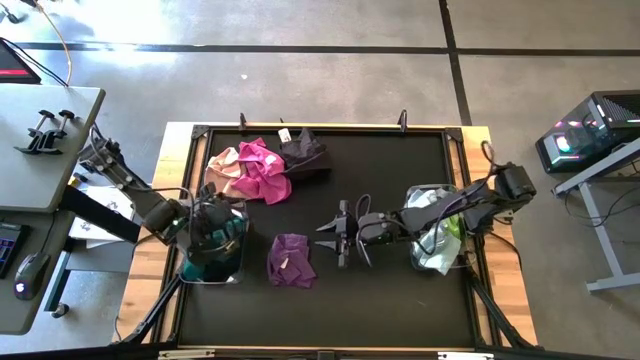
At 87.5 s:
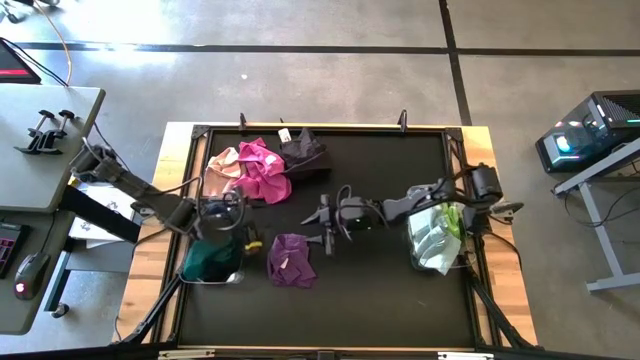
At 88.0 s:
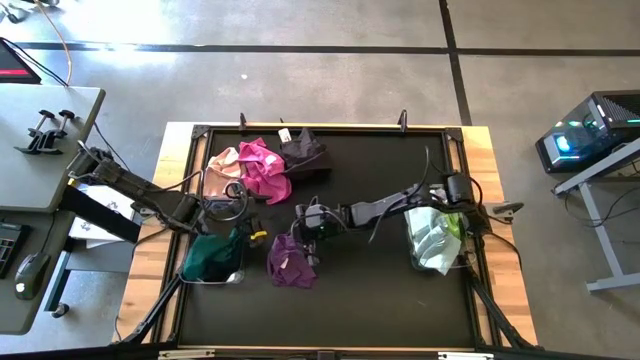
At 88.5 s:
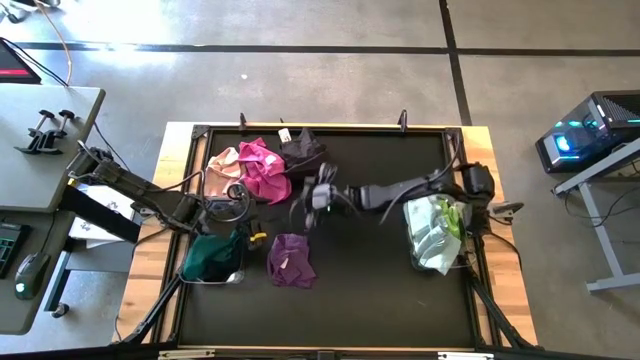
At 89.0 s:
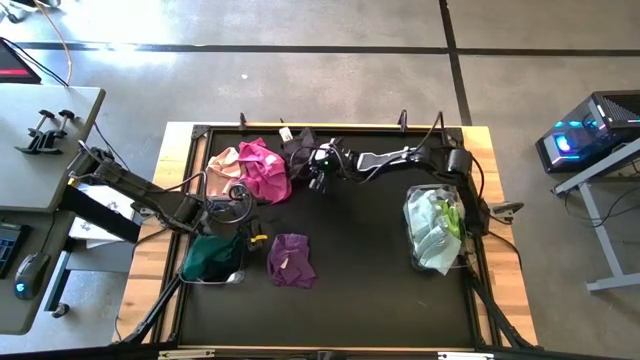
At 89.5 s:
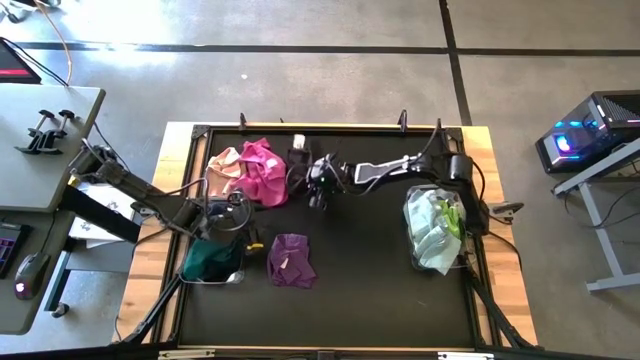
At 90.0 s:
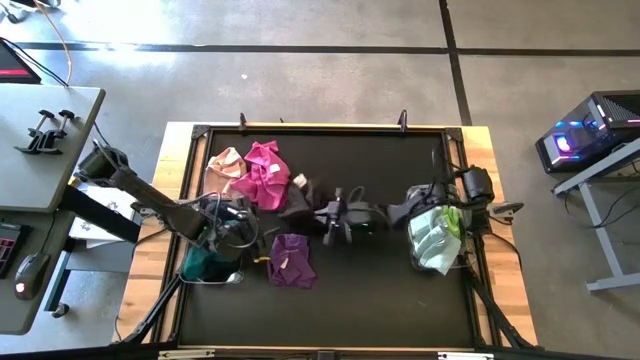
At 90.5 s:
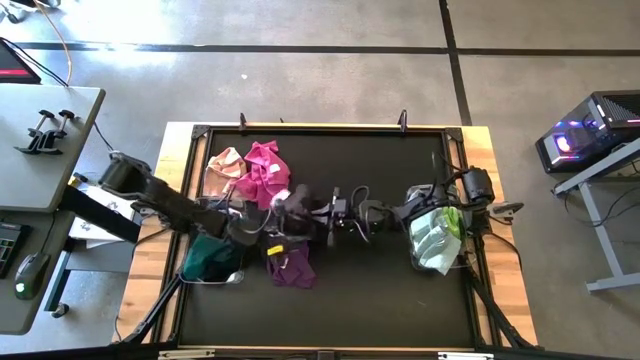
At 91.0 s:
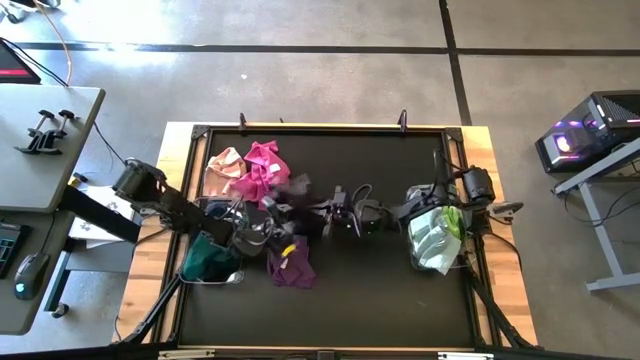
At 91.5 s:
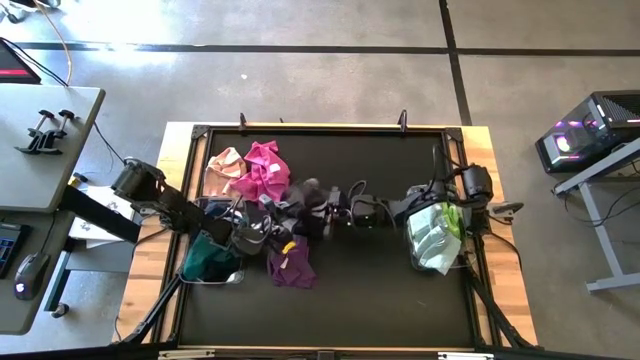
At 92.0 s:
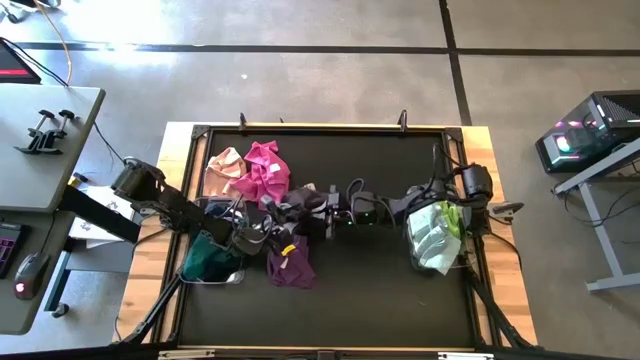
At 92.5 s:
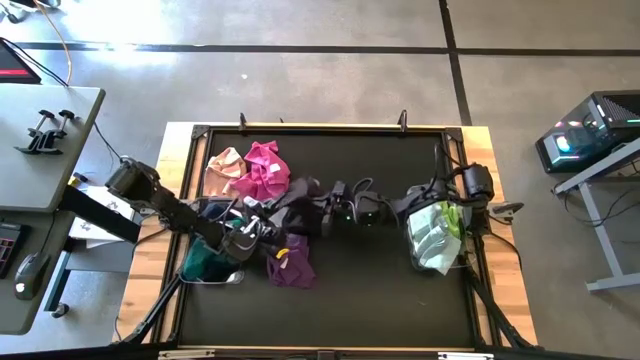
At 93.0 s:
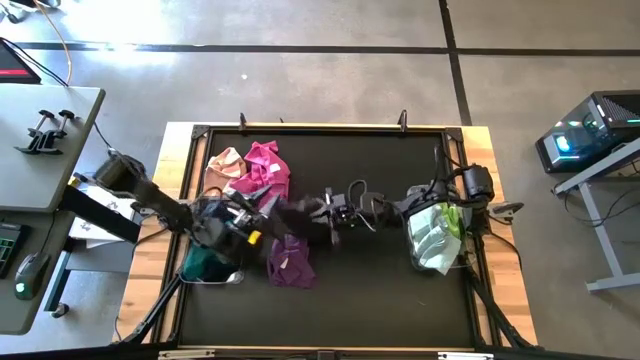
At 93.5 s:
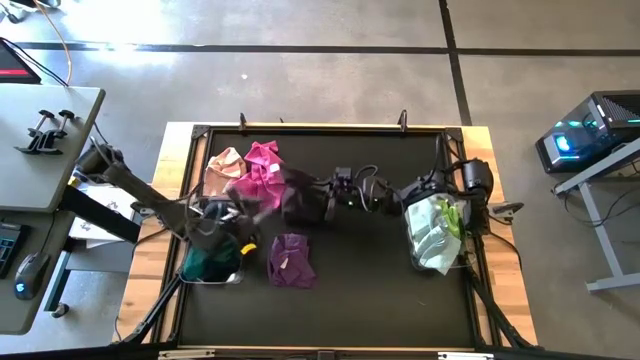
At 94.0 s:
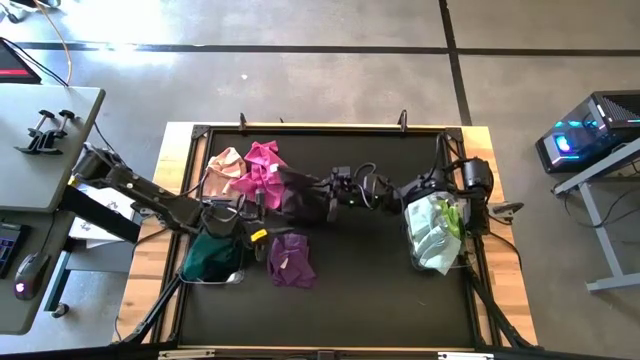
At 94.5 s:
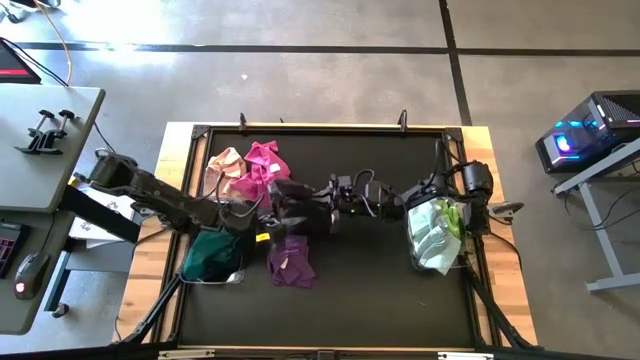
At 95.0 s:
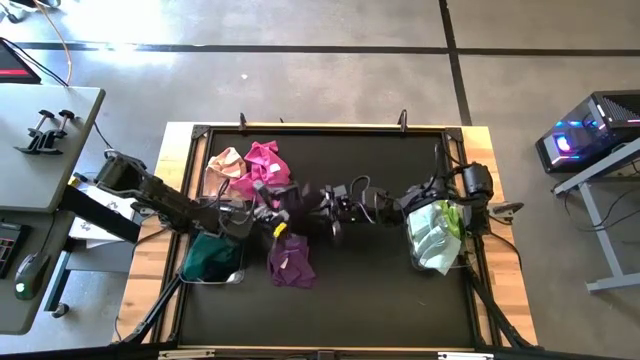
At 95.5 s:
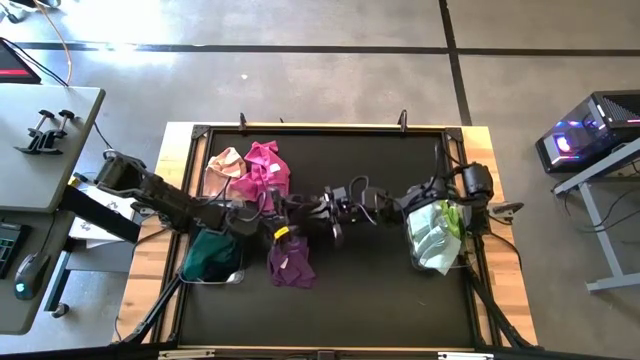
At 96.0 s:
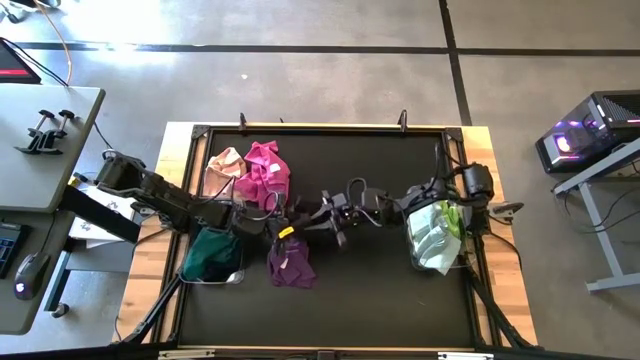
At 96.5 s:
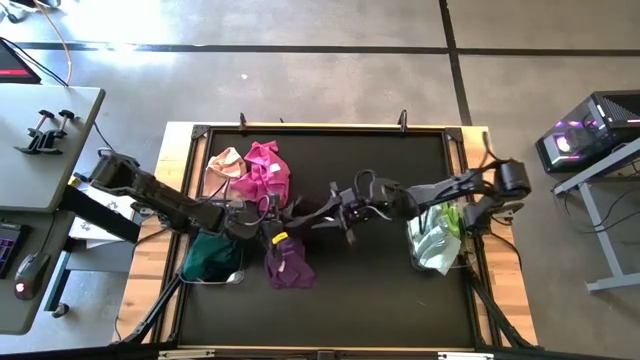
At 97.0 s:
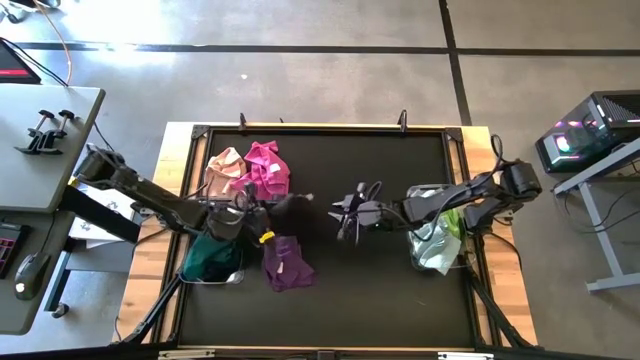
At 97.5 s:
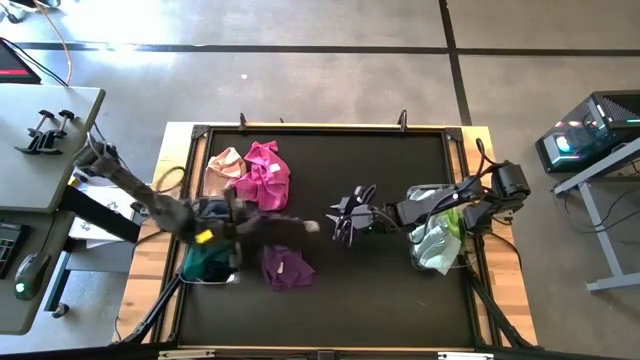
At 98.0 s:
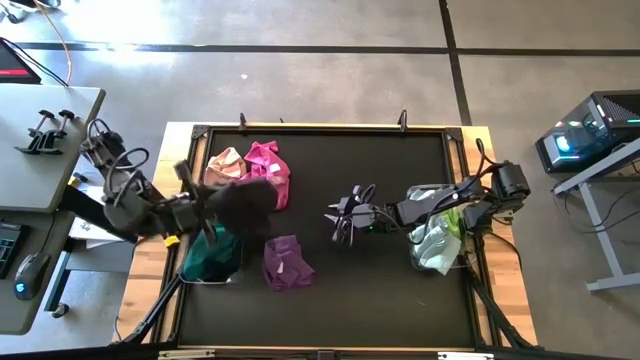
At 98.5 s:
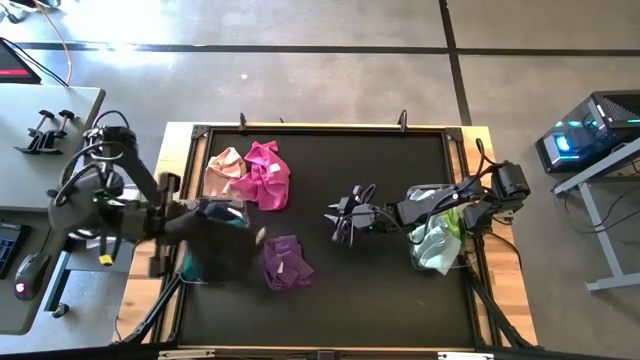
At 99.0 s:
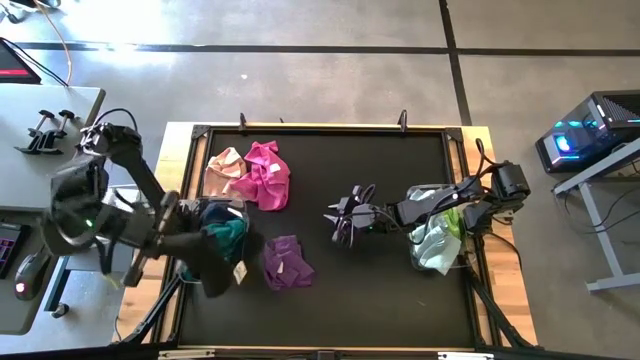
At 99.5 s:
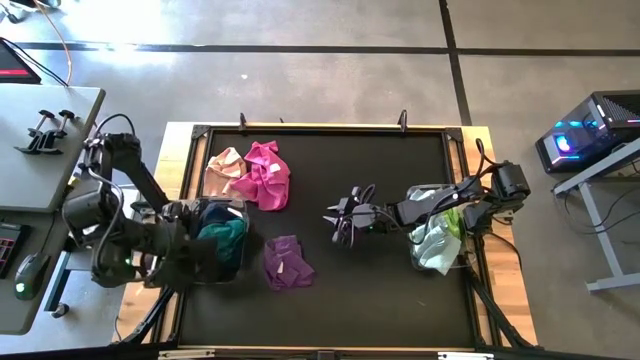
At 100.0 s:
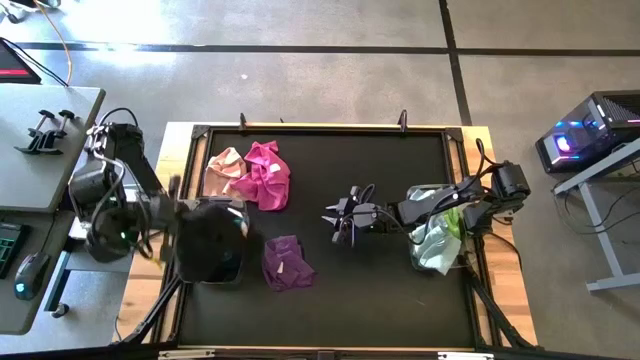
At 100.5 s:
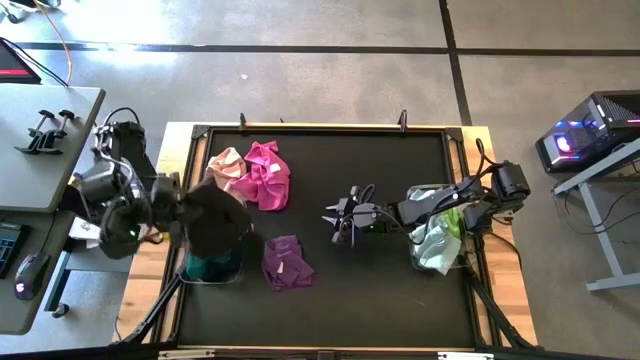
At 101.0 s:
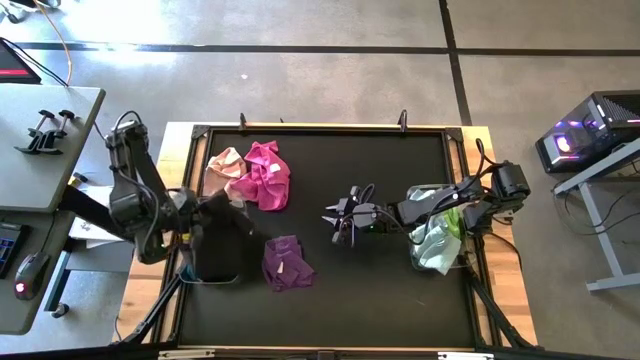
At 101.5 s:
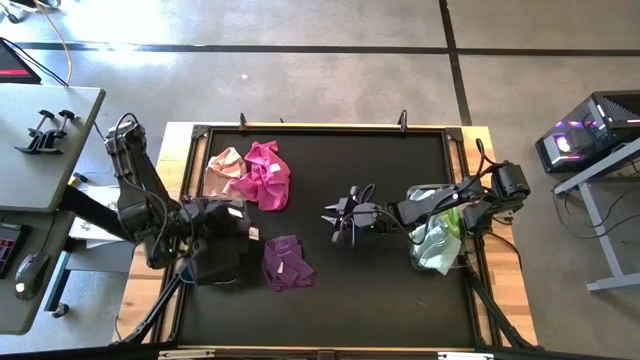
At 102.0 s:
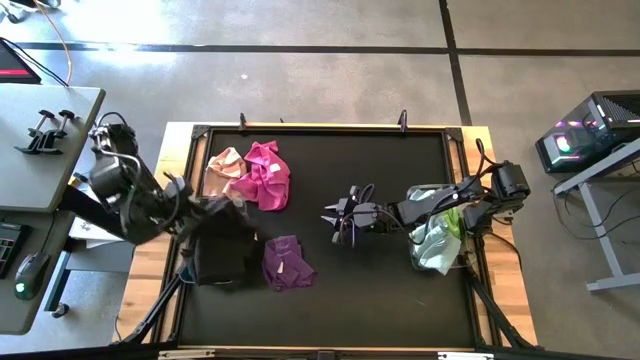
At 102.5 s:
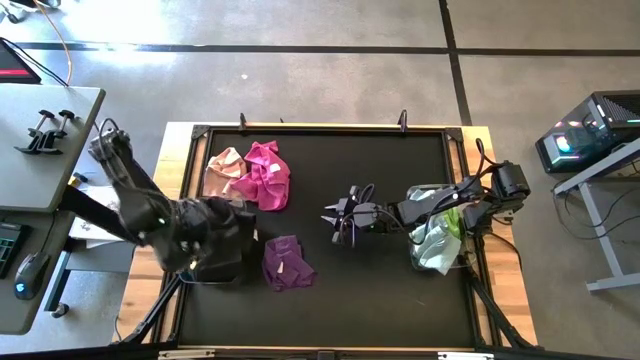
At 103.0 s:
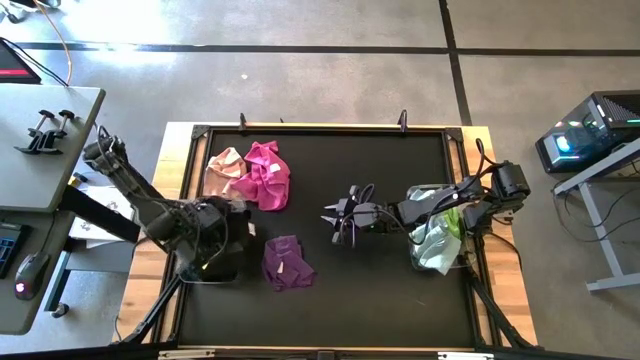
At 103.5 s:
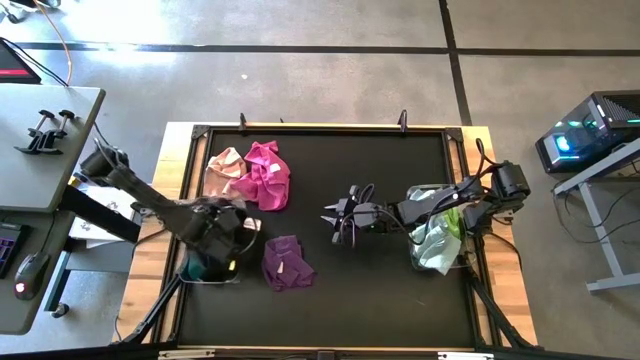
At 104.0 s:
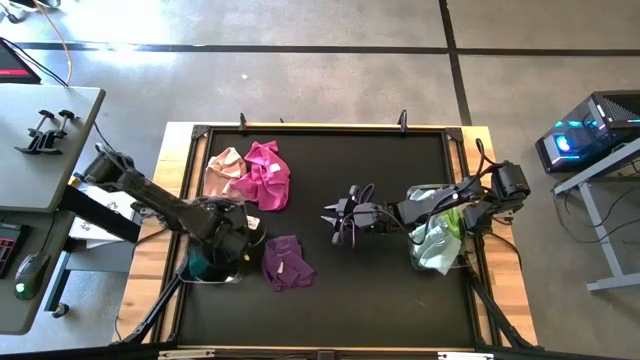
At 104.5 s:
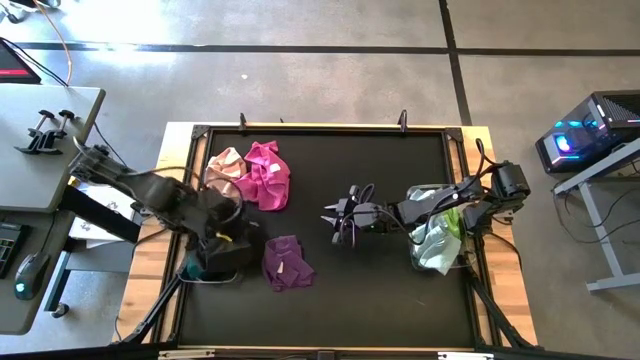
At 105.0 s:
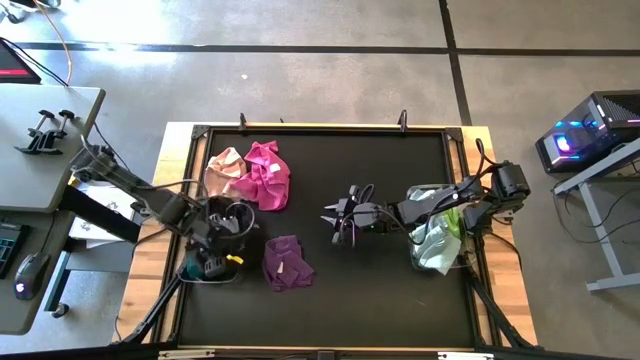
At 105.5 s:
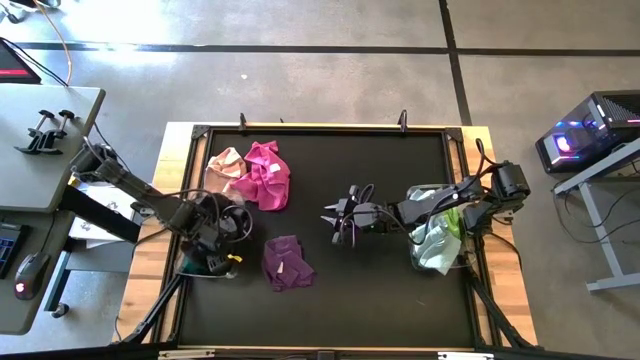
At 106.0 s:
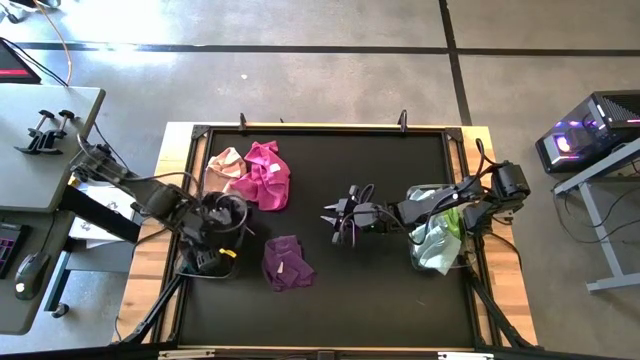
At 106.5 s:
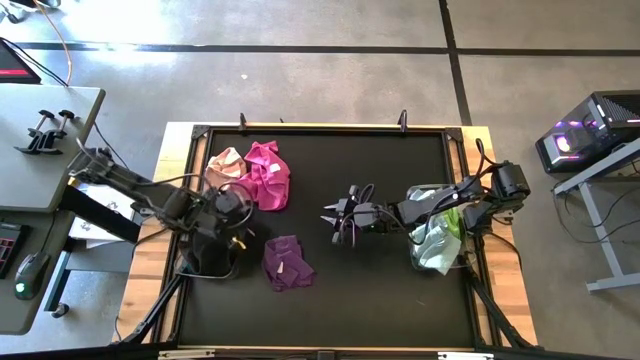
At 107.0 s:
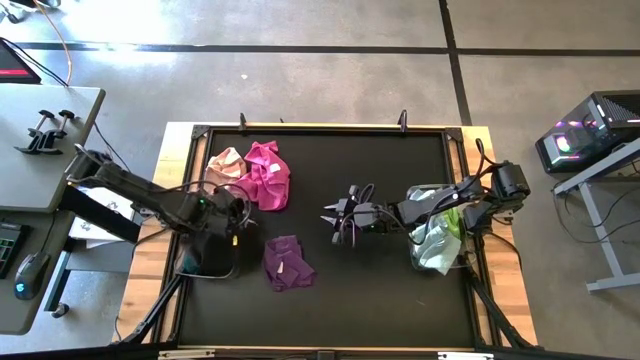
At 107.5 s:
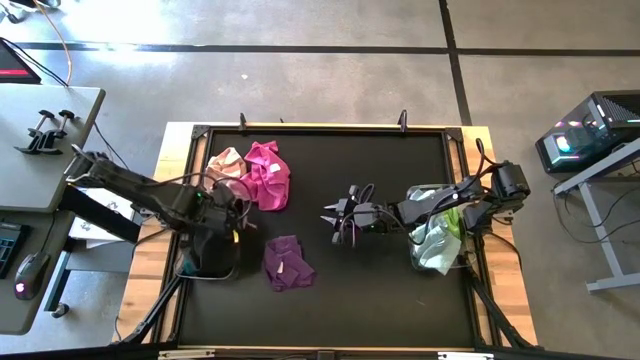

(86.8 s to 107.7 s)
Task: Sort towels by color in basket
Put the black towel into the left transparent bin
